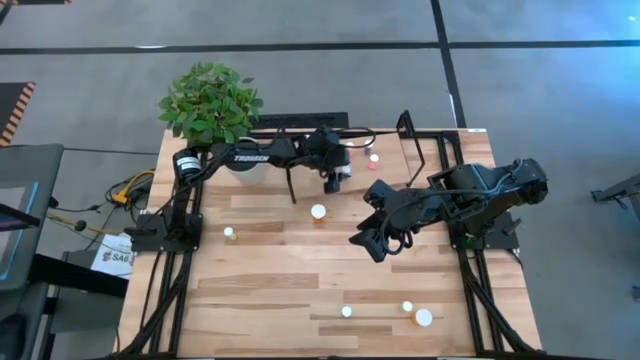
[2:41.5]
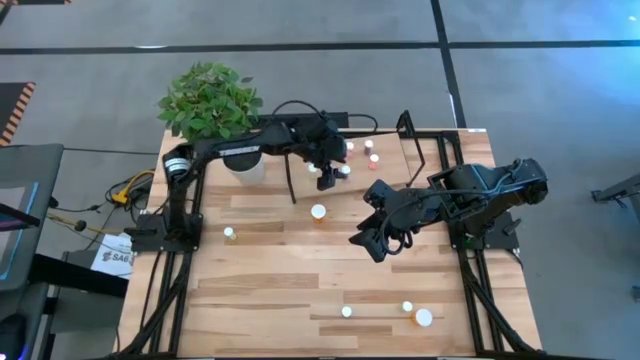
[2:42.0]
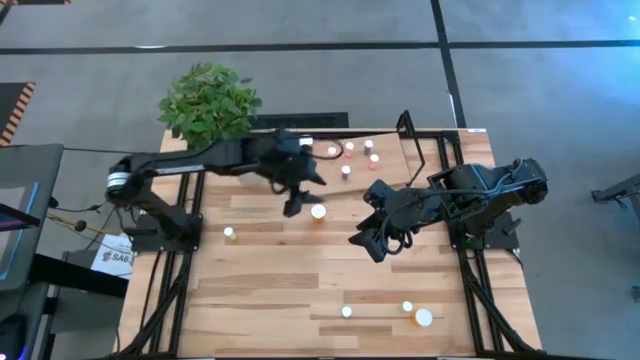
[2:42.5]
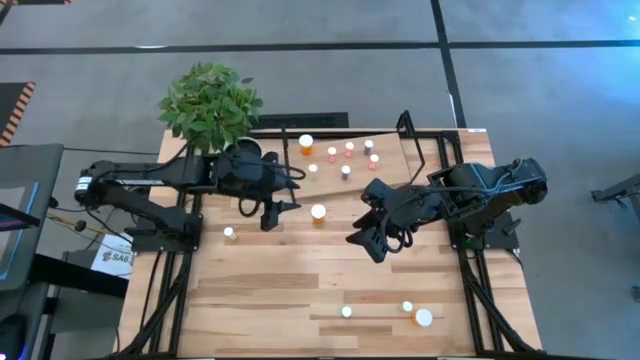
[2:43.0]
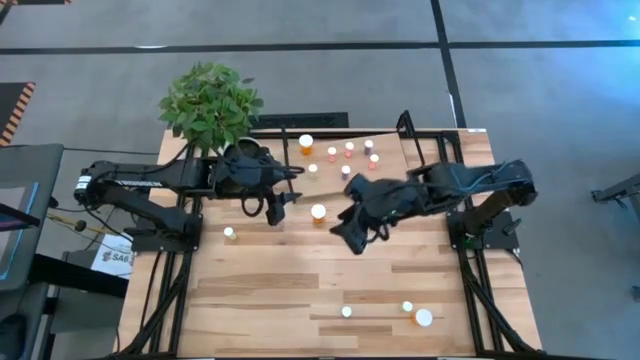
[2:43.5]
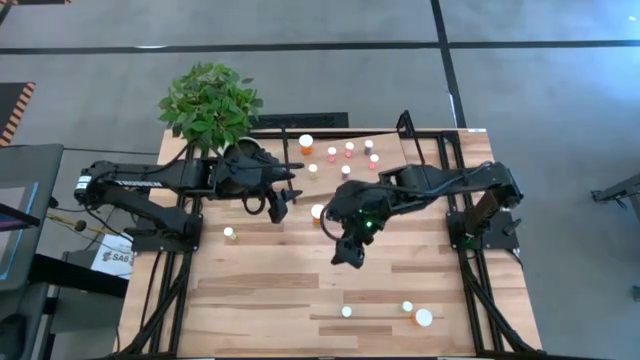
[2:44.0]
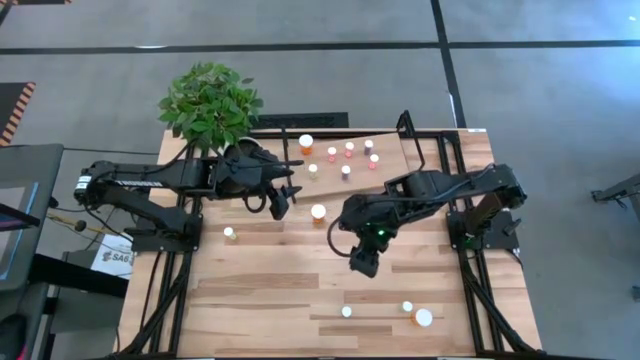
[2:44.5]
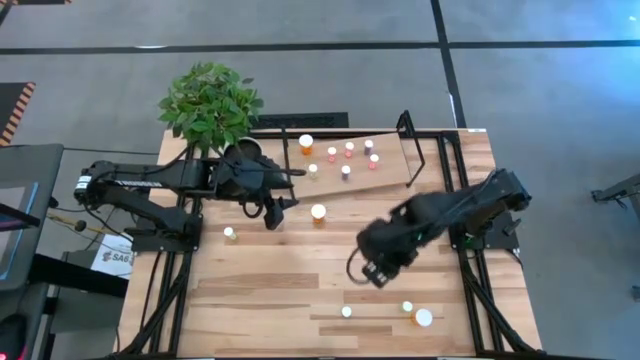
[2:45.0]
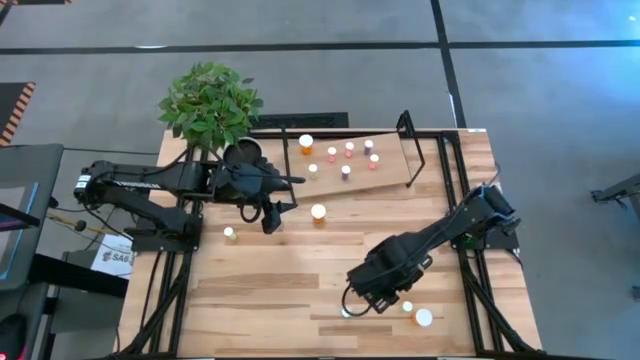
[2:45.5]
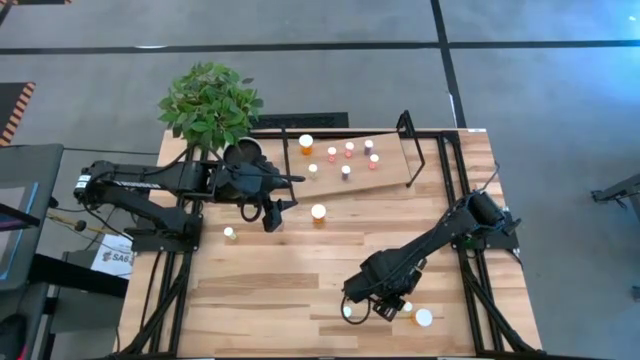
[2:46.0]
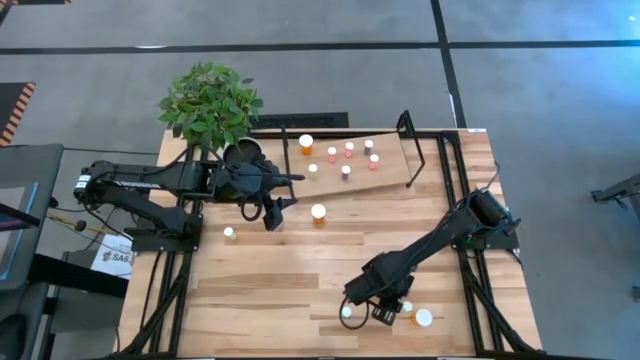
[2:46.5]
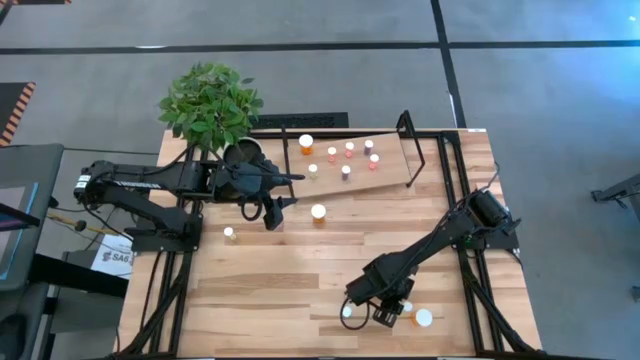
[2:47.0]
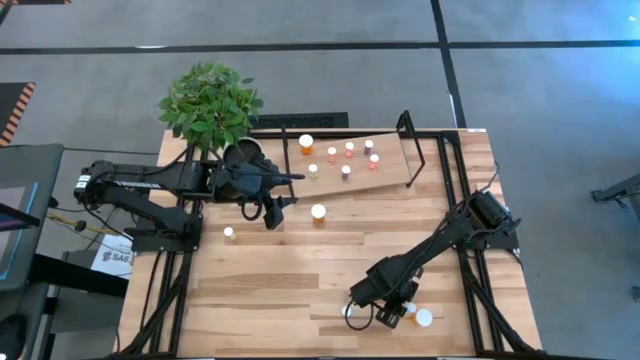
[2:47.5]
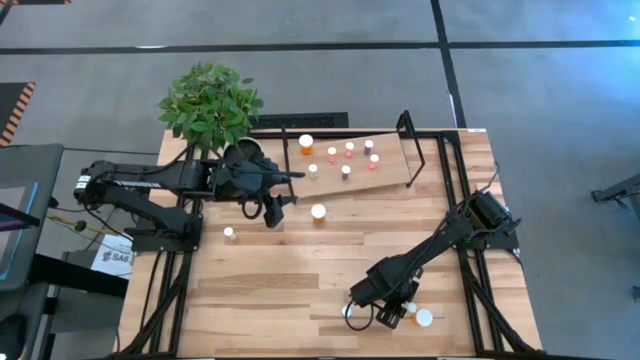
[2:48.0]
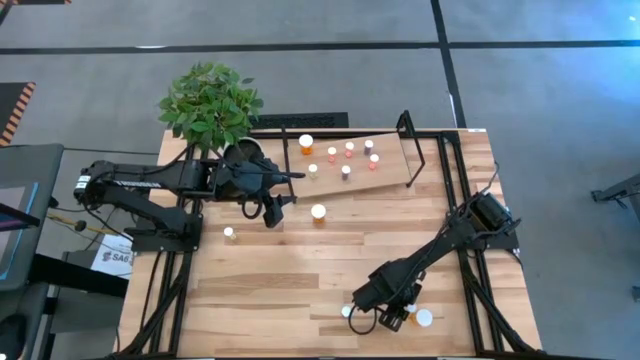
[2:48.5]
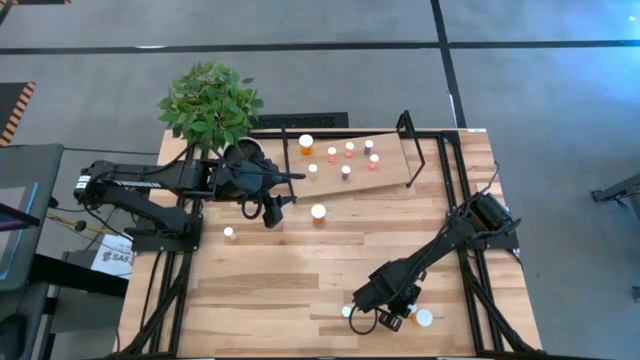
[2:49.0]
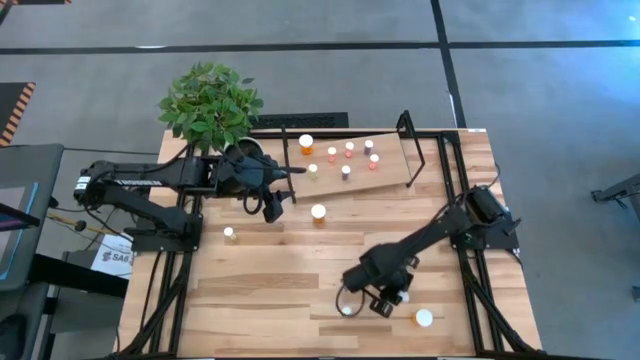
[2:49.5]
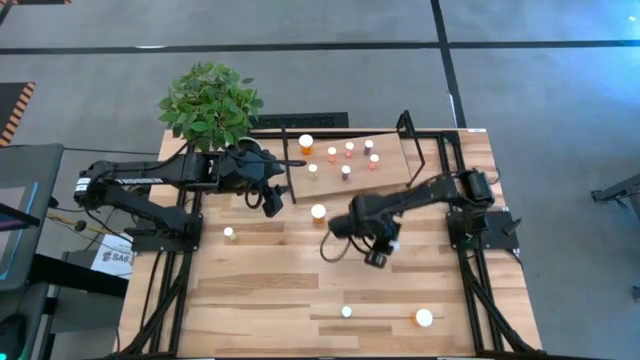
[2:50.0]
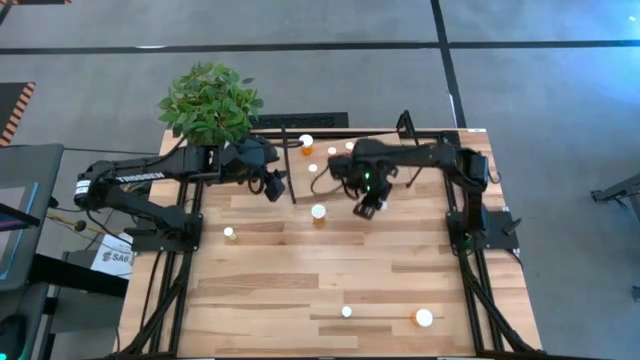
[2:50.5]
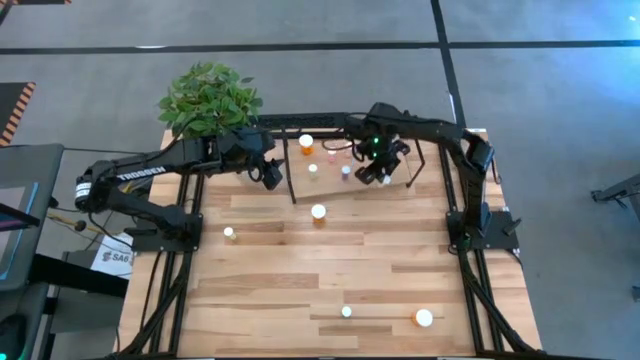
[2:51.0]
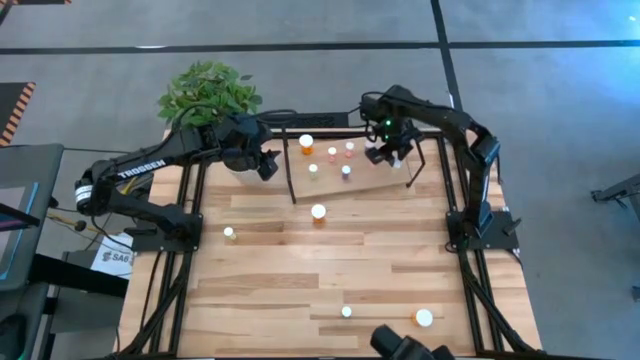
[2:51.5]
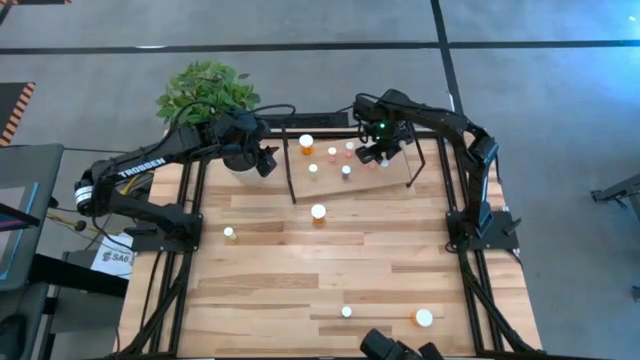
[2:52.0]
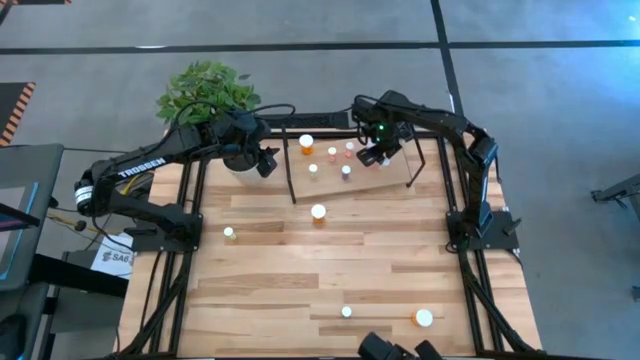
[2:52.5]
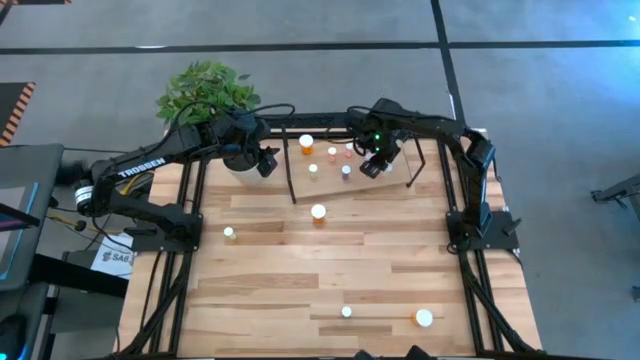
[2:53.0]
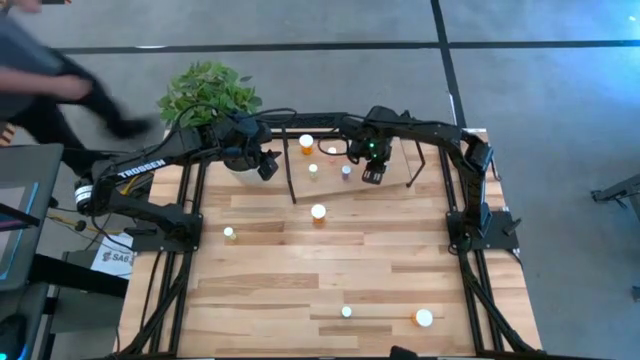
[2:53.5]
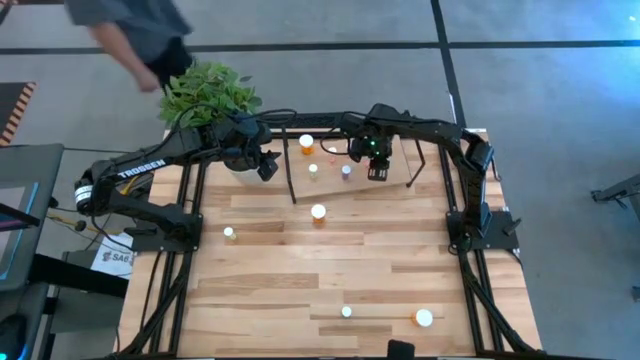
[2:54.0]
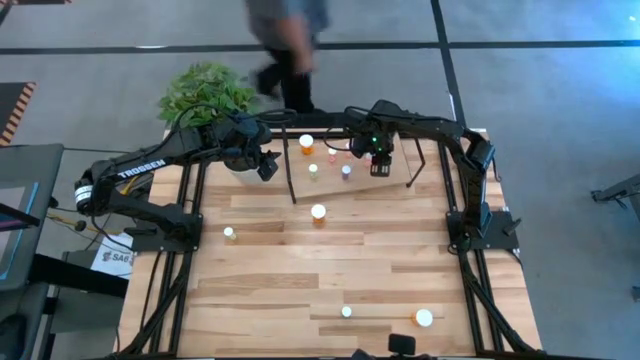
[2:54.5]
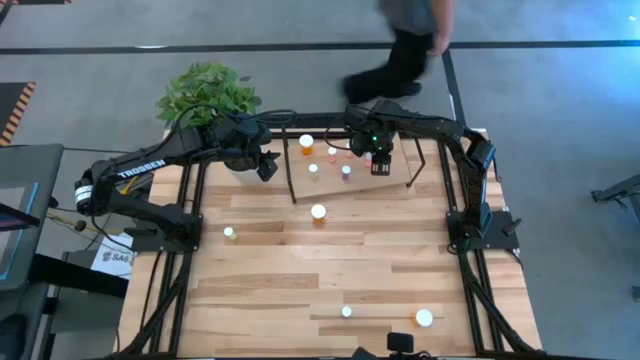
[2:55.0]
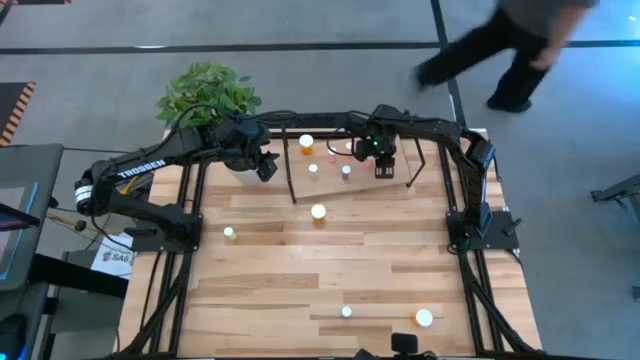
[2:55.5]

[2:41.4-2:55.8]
Task: Pick and place medicine bottles onto shelf by color
Put the bottom yellow pill bottle on the shelf

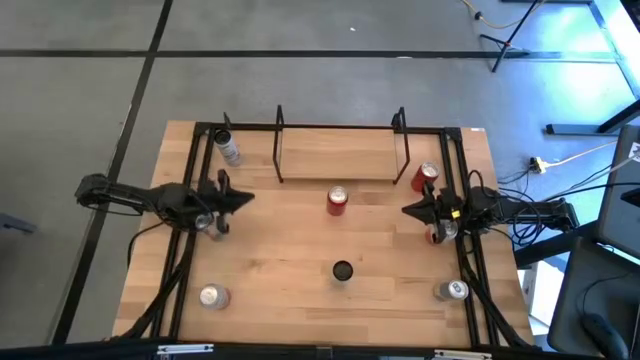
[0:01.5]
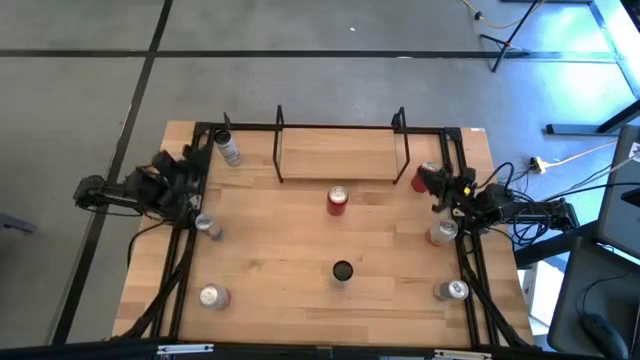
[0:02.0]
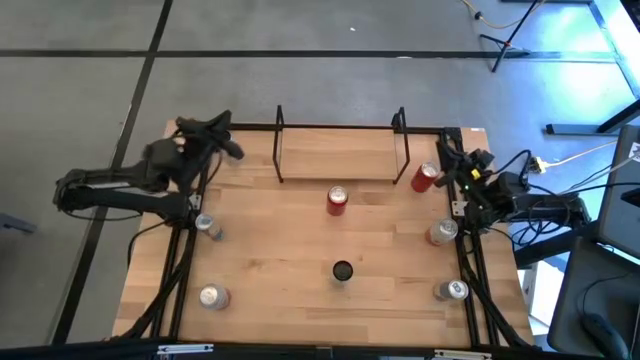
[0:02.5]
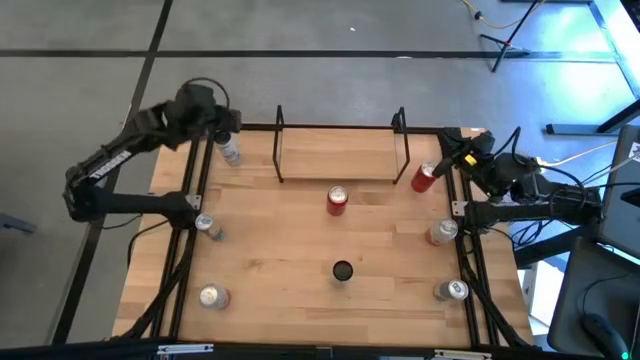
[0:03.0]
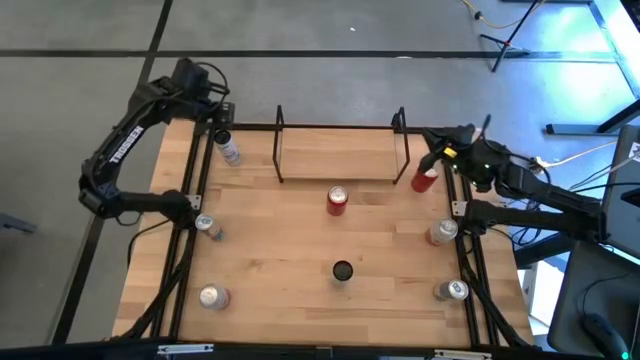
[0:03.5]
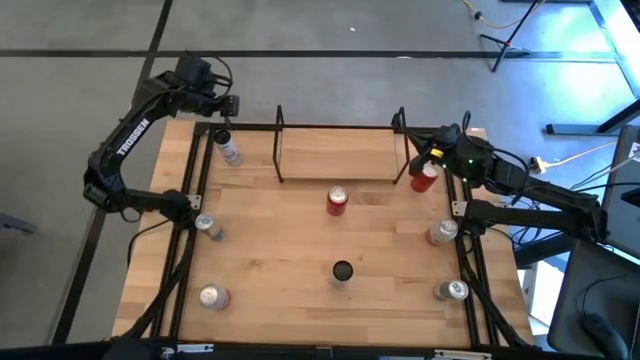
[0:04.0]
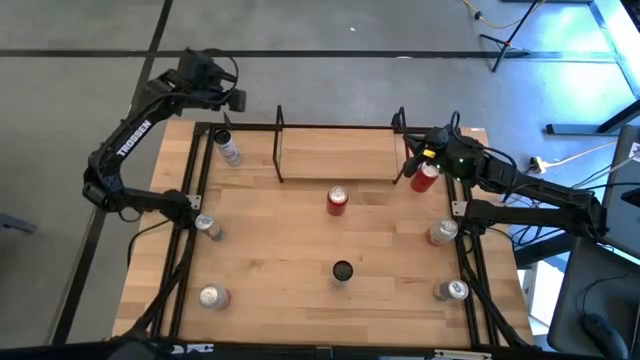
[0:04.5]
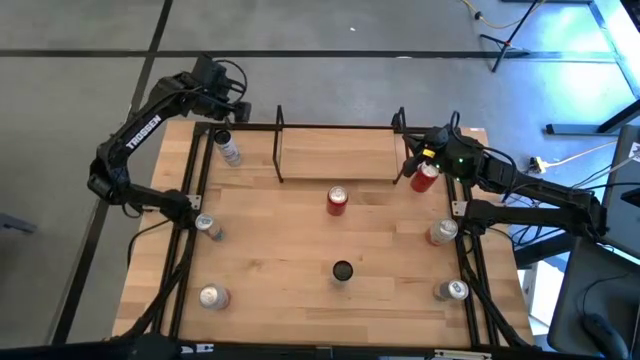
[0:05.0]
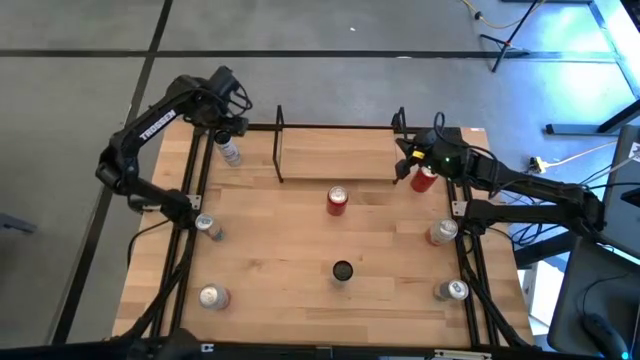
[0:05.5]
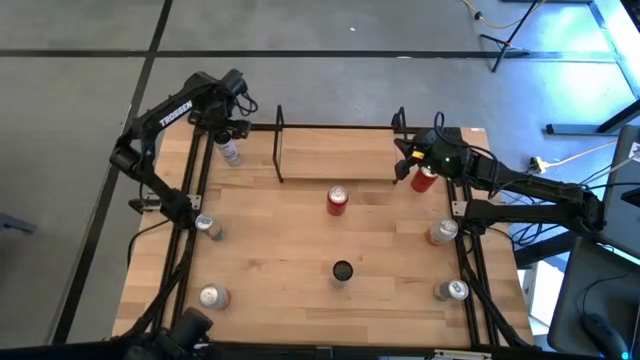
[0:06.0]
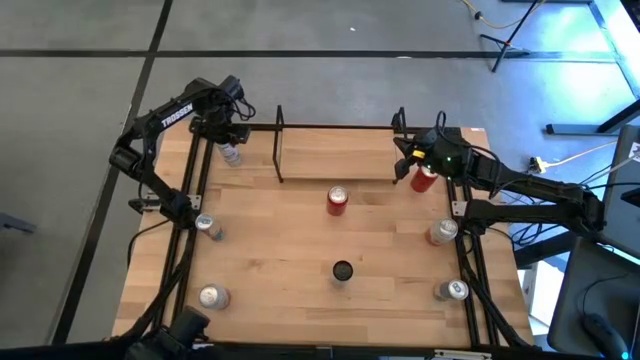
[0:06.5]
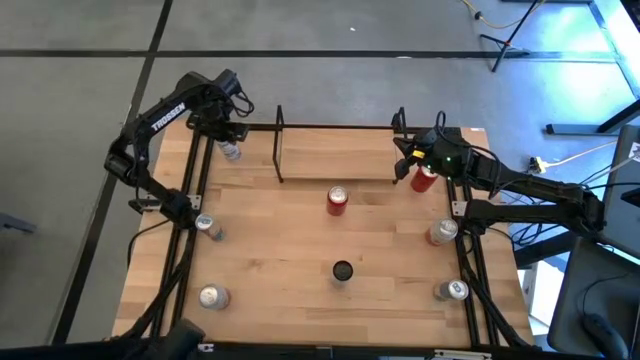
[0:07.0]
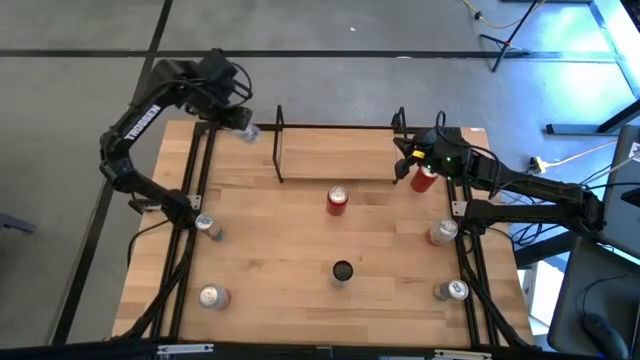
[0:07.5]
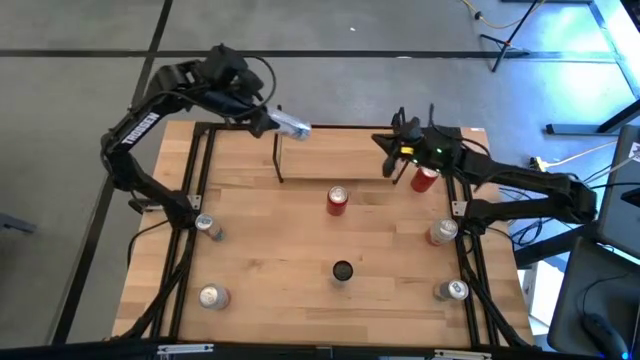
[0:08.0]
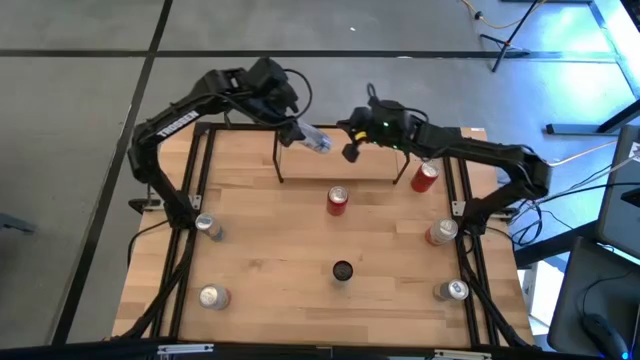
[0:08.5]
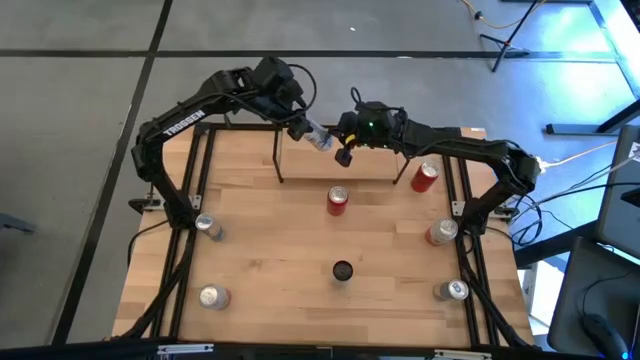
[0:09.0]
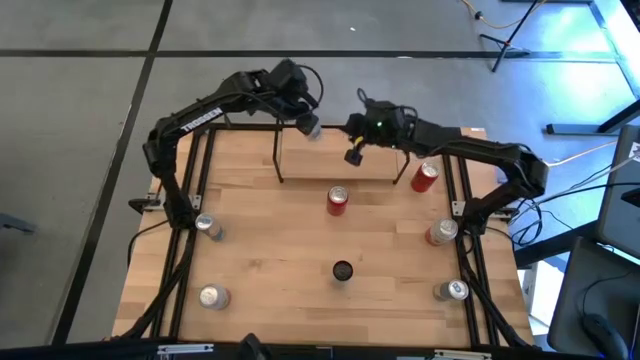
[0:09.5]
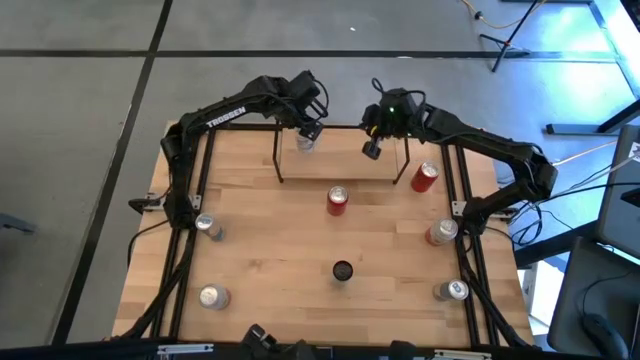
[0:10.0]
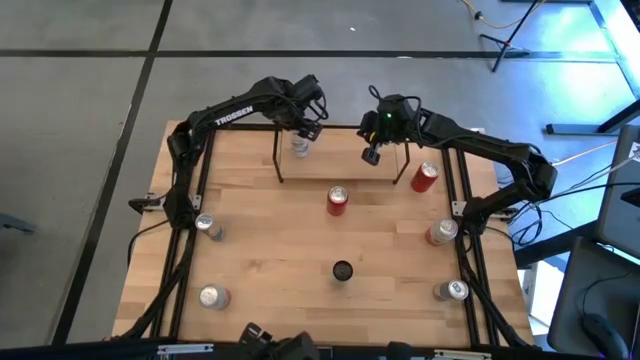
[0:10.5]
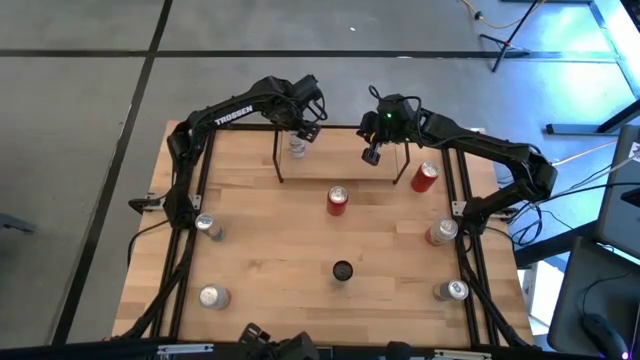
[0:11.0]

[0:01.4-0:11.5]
Task: Place canned beverage on shelf
Put the top white soda can on the shelf
